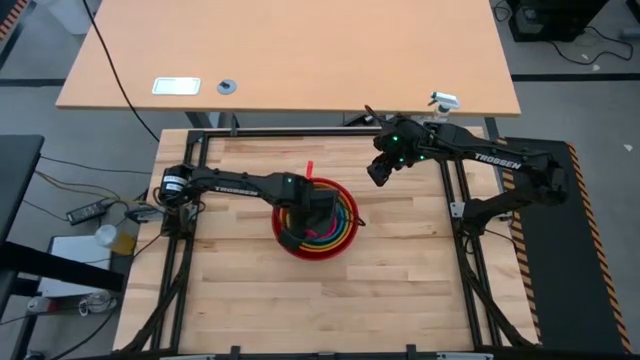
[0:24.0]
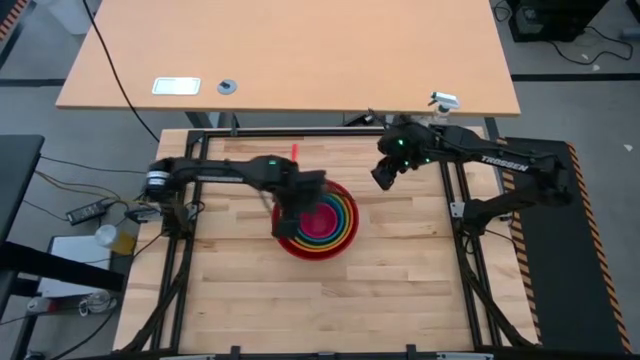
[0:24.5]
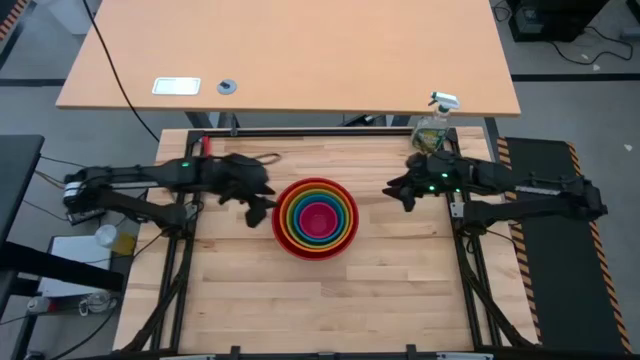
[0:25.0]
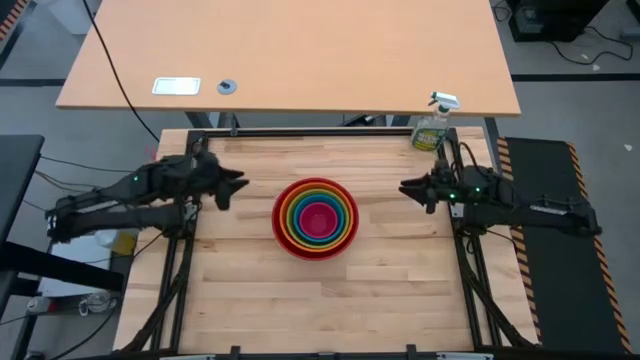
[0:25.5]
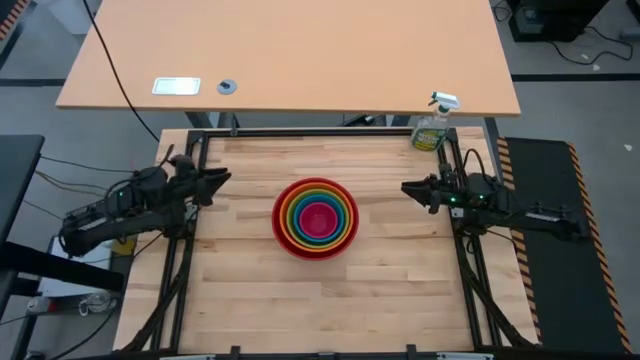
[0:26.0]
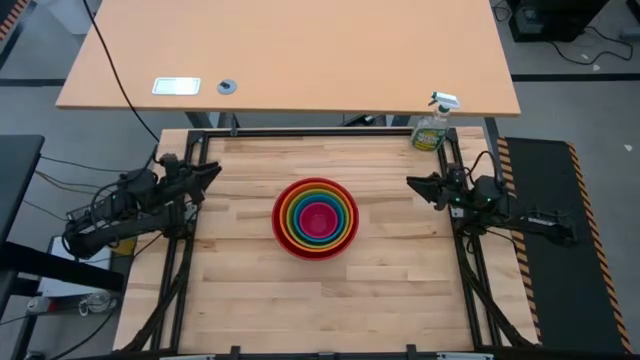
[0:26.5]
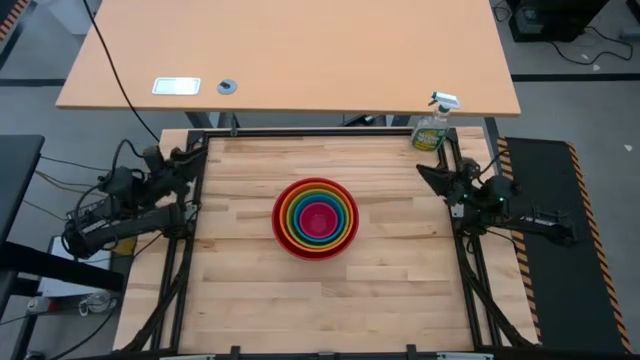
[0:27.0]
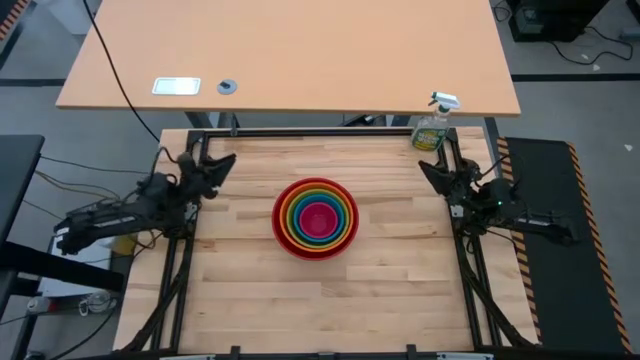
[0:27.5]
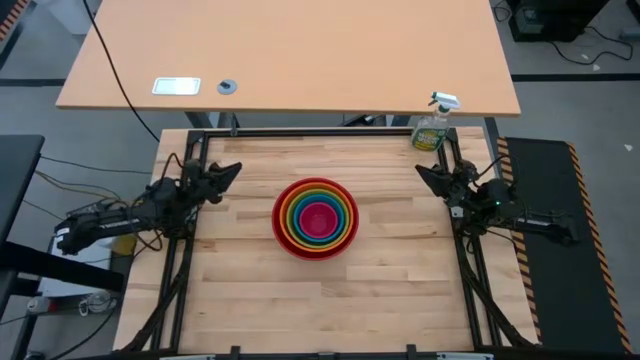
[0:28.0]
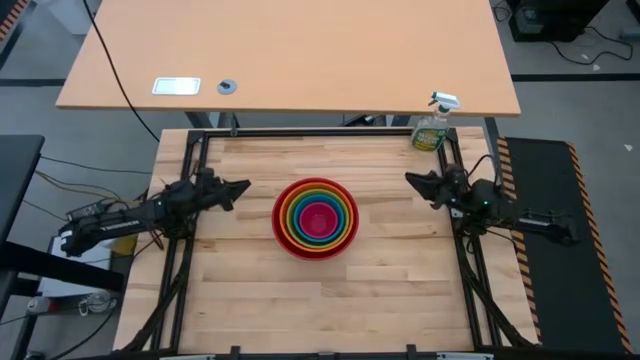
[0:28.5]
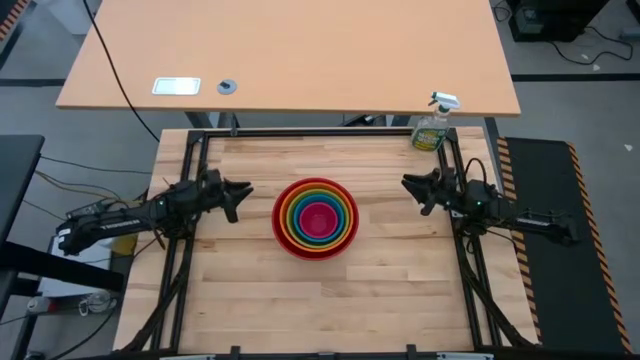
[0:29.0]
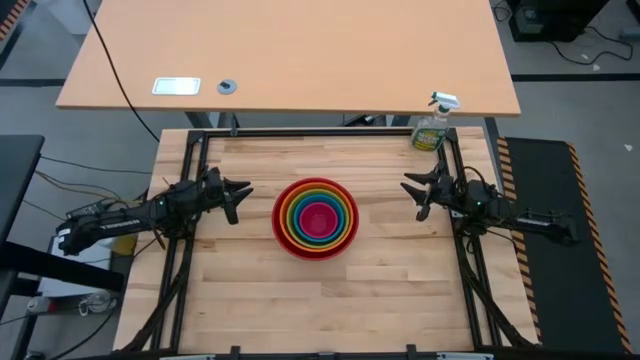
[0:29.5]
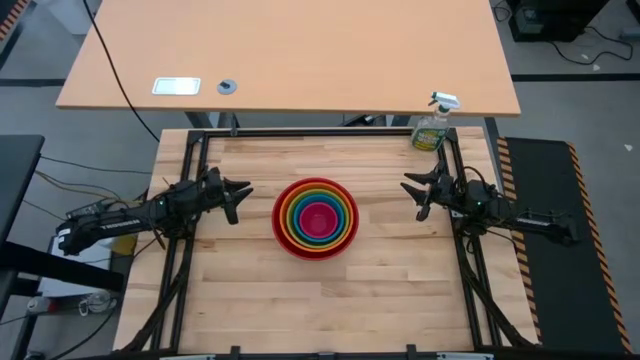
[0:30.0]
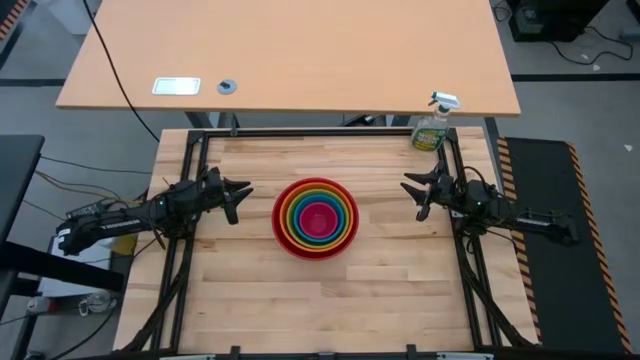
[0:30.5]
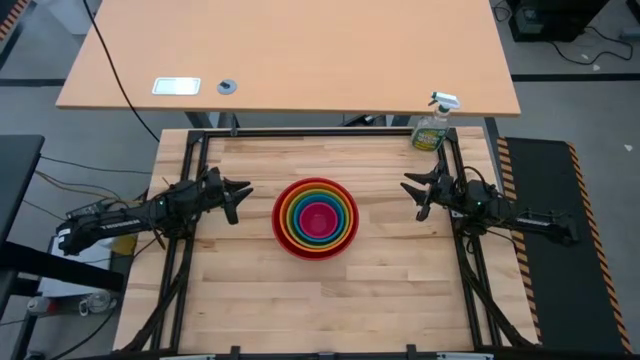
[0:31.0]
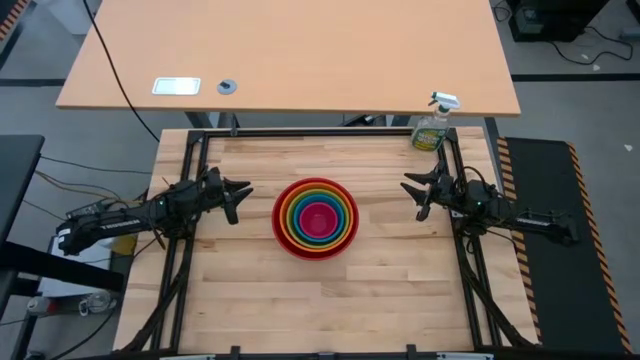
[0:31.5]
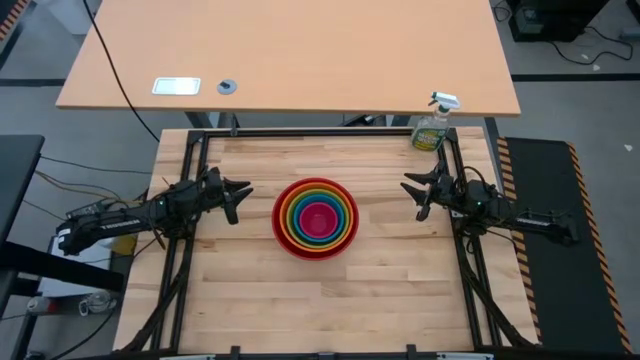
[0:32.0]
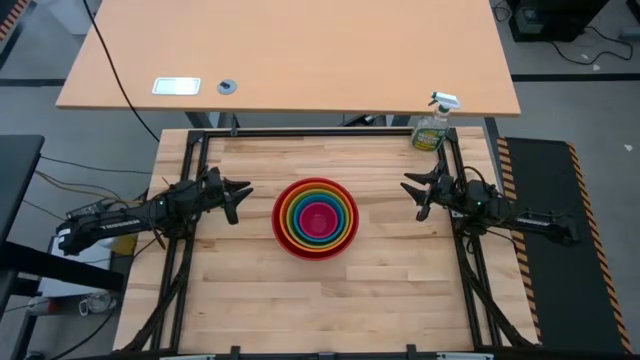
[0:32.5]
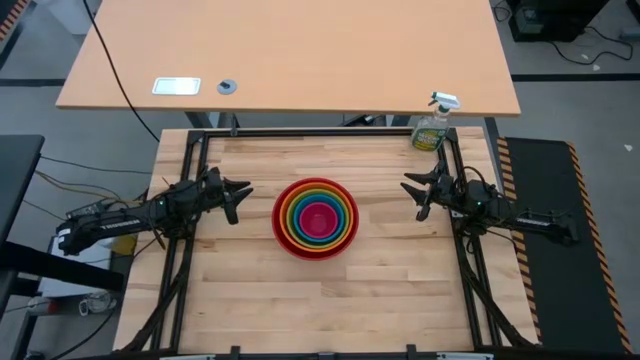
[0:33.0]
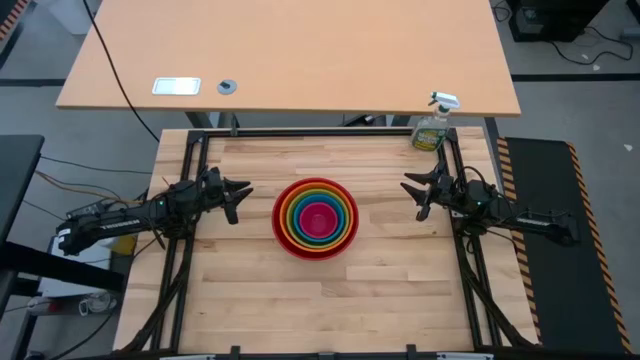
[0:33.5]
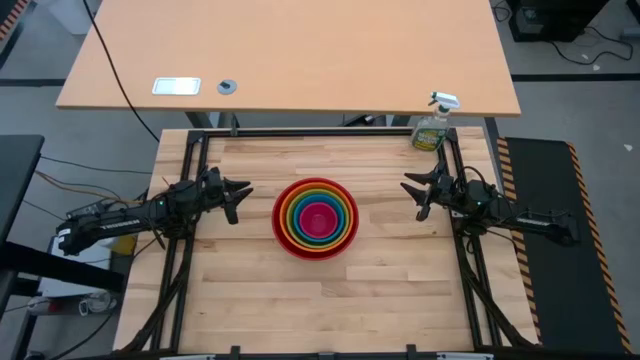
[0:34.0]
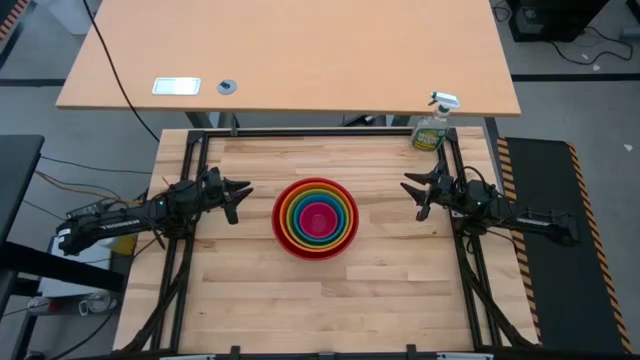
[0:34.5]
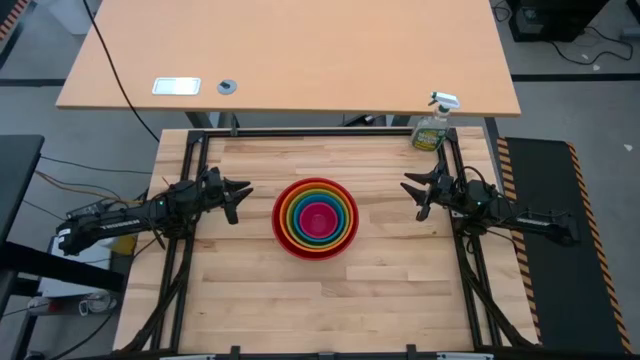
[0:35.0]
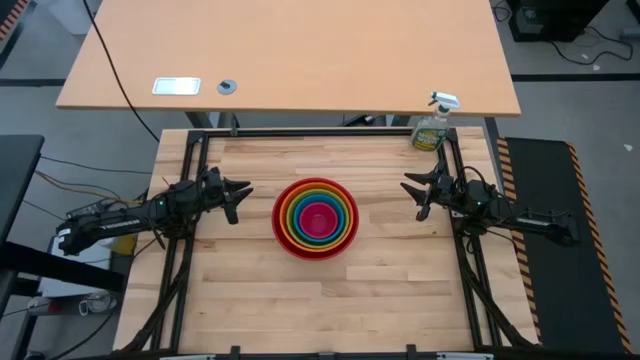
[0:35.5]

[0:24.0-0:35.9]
Return to Home Position

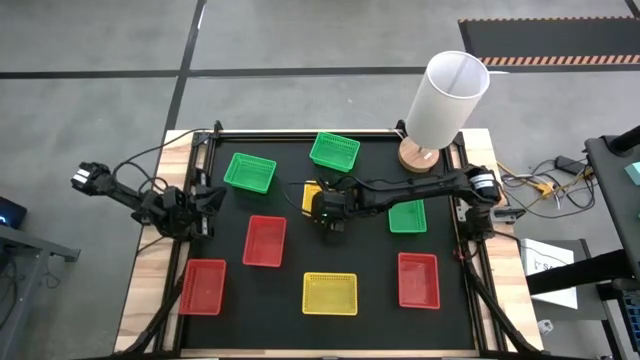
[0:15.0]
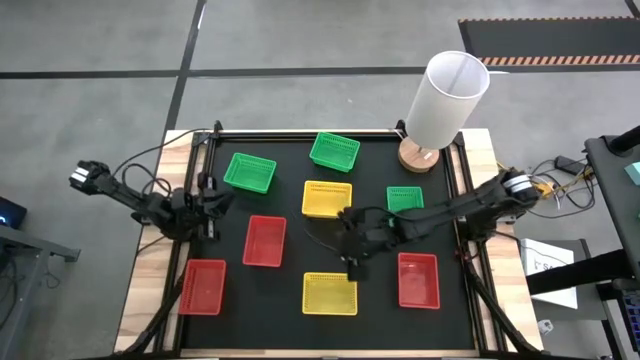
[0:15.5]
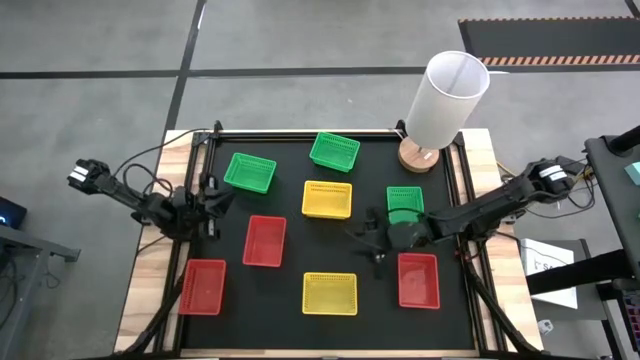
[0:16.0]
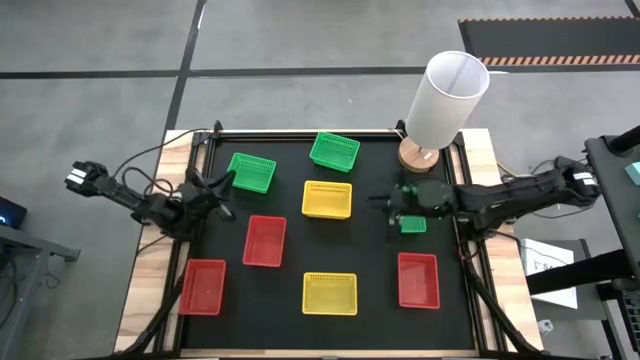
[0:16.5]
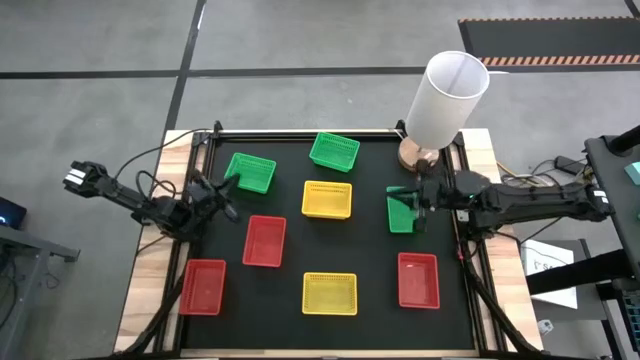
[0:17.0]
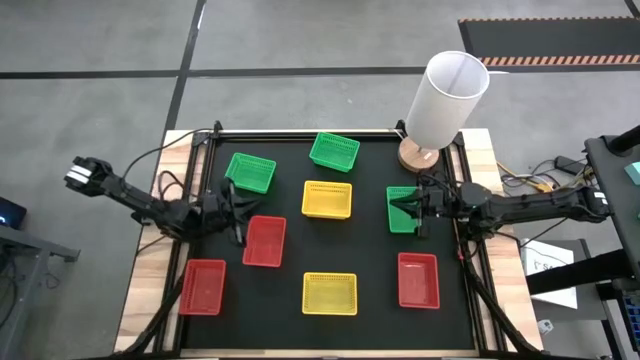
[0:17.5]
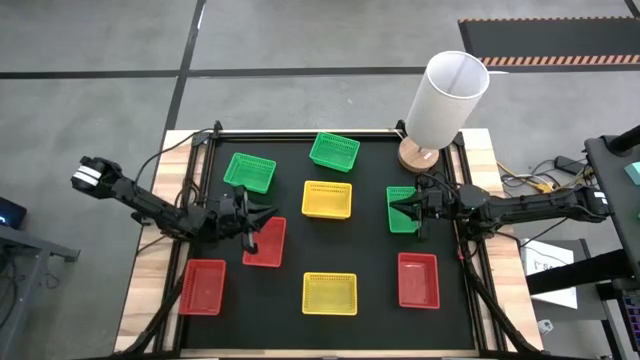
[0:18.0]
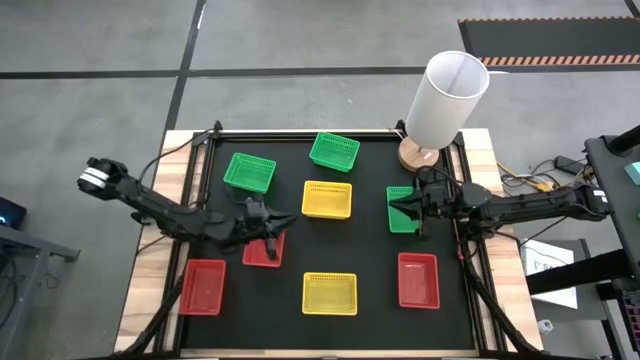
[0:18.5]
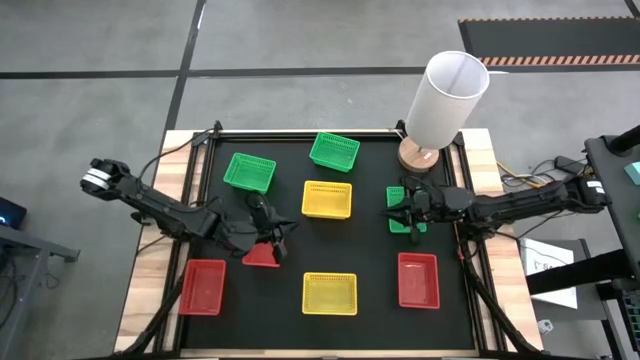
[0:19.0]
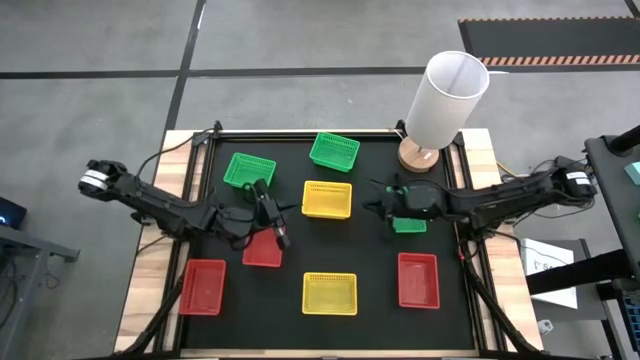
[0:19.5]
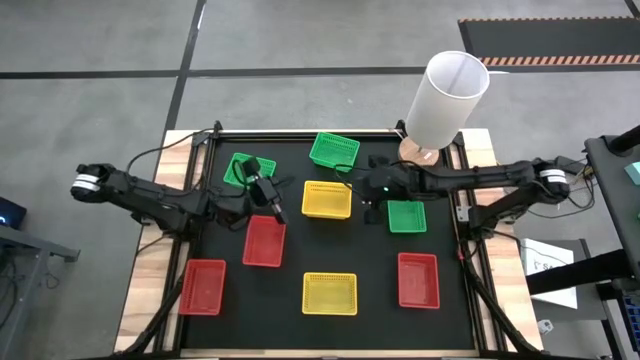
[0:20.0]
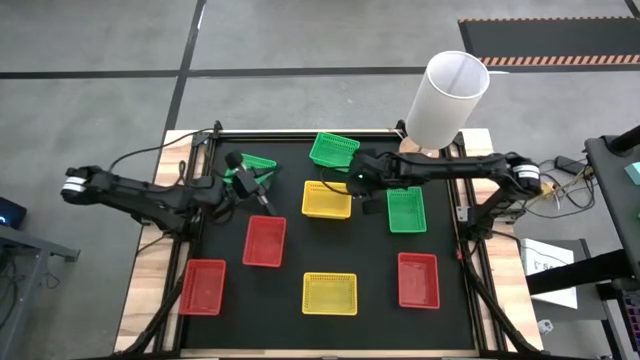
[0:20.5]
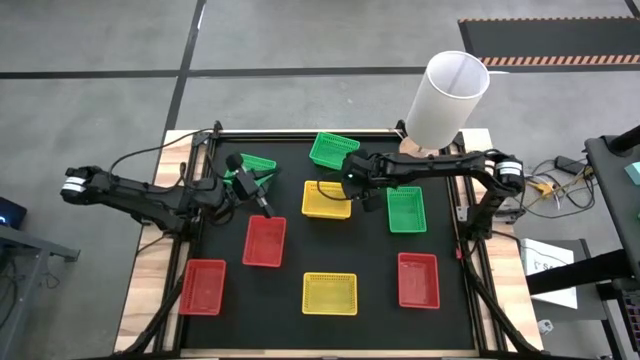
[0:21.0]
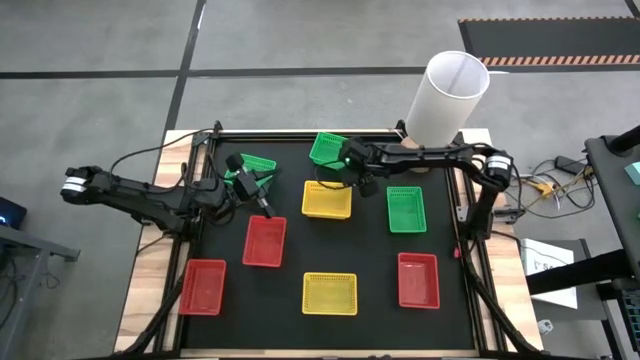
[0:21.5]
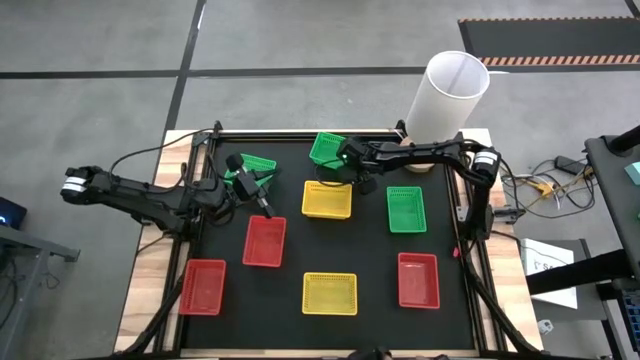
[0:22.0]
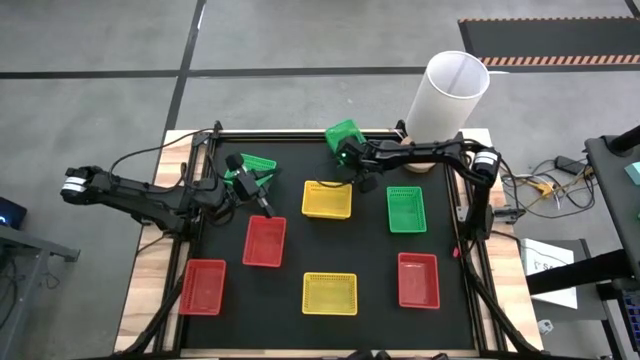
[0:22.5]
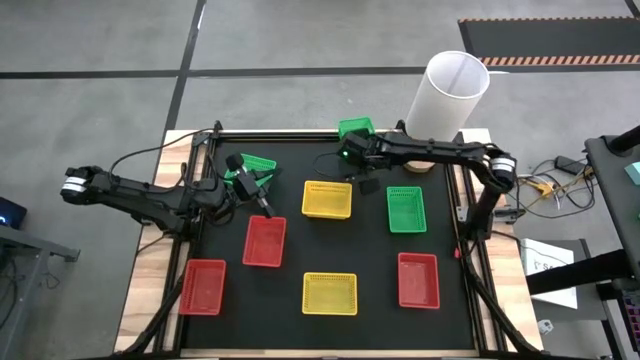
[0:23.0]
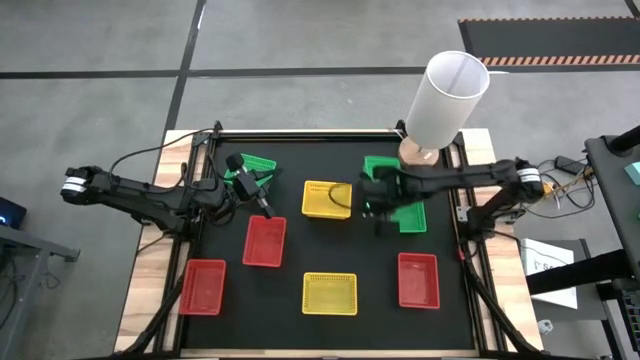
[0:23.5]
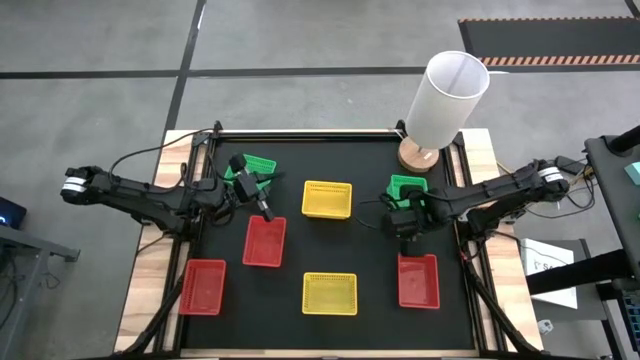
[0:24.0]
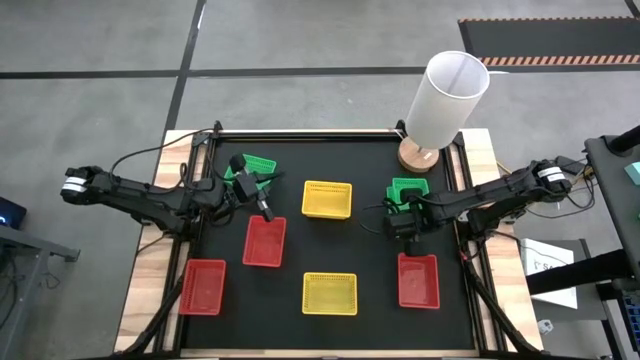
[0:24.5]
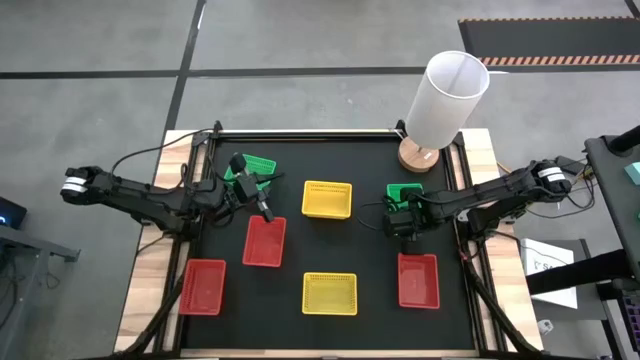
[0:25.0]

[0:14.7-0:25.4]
Stack the top green basket on top of the right green bin
